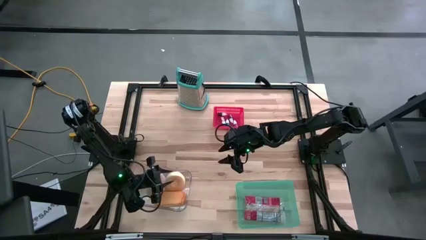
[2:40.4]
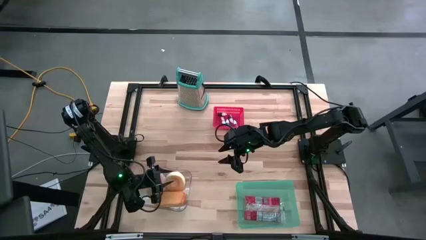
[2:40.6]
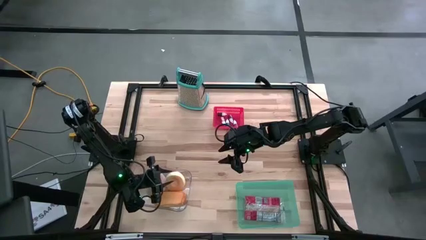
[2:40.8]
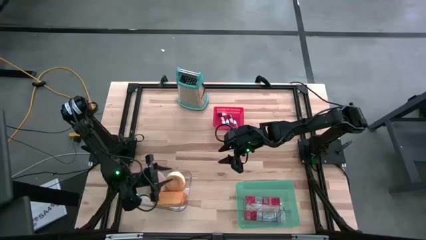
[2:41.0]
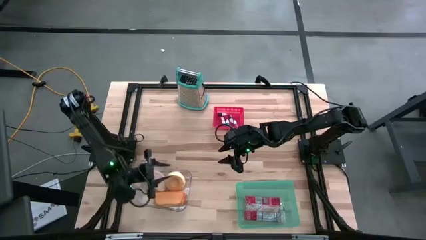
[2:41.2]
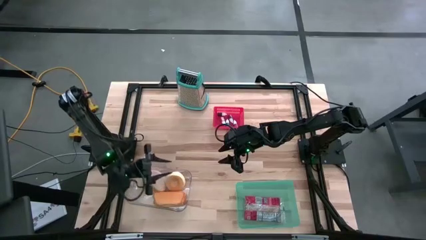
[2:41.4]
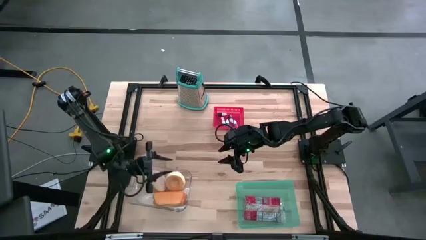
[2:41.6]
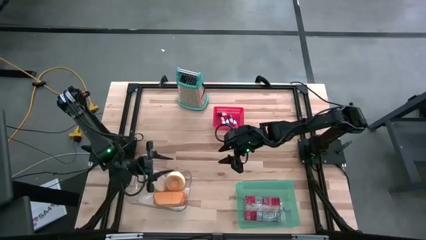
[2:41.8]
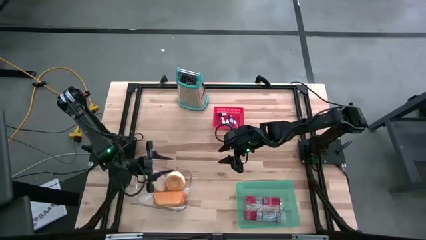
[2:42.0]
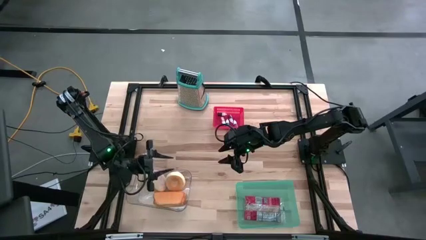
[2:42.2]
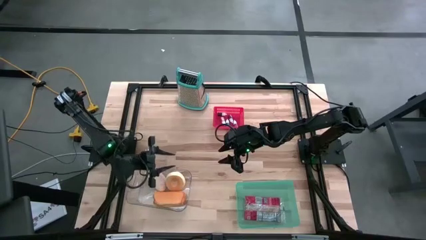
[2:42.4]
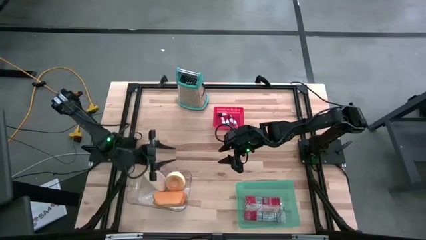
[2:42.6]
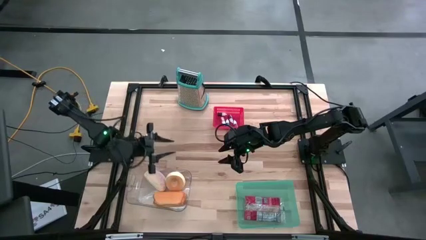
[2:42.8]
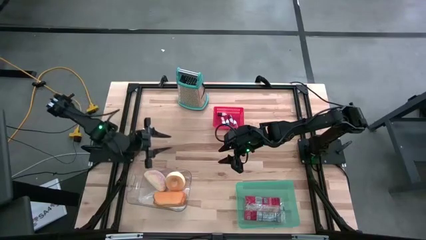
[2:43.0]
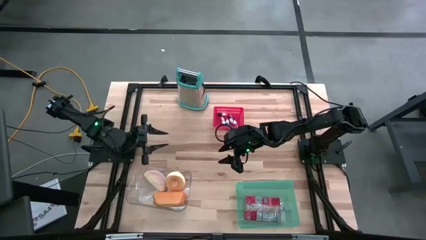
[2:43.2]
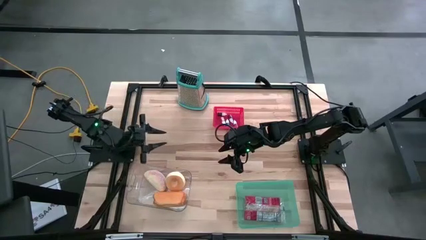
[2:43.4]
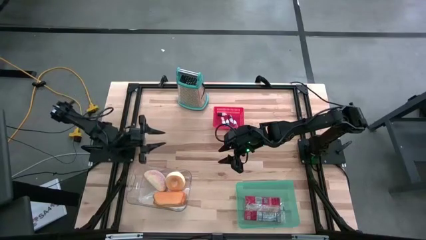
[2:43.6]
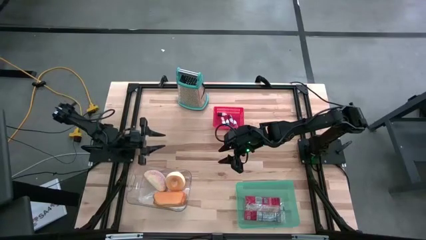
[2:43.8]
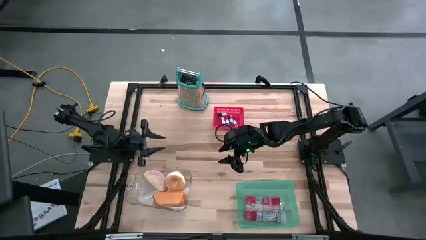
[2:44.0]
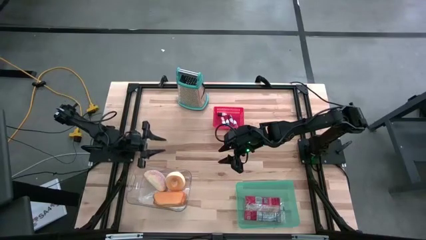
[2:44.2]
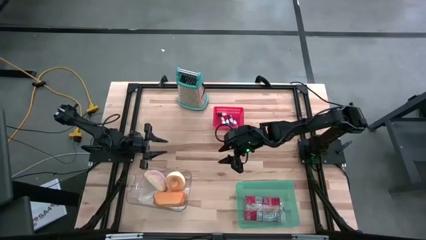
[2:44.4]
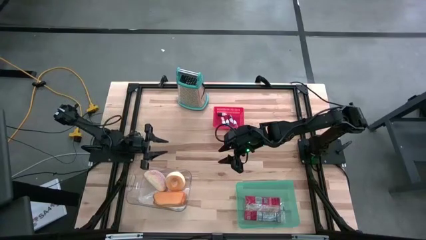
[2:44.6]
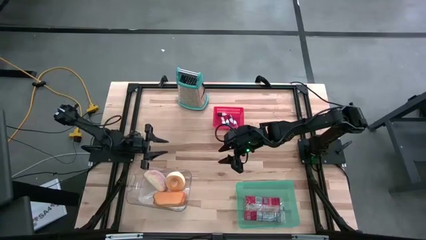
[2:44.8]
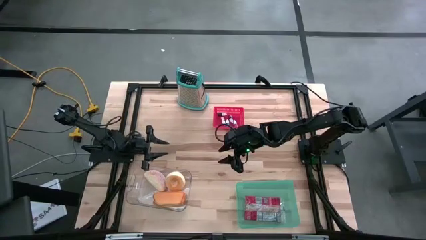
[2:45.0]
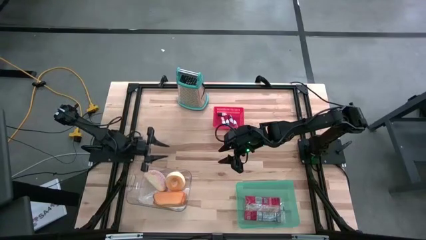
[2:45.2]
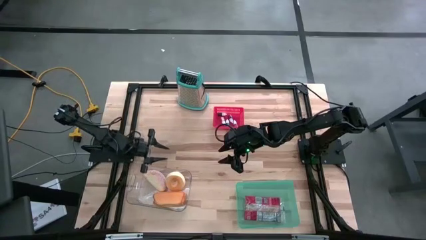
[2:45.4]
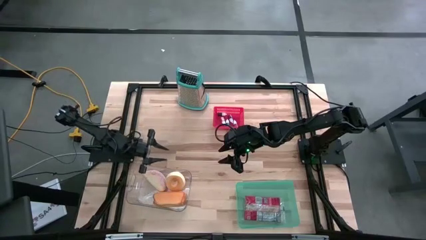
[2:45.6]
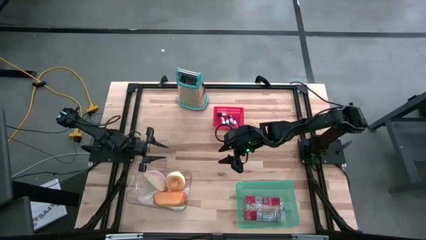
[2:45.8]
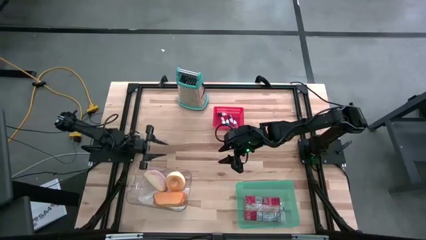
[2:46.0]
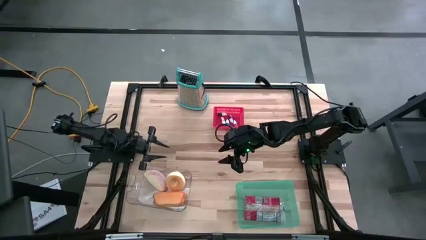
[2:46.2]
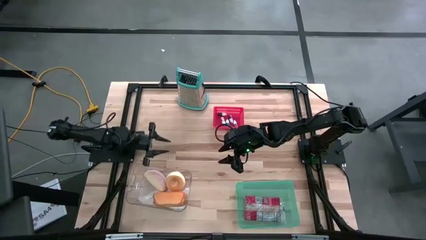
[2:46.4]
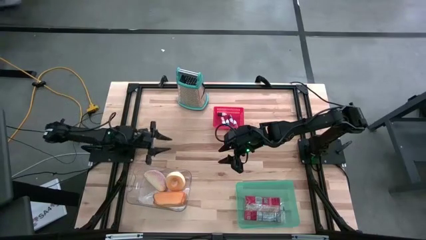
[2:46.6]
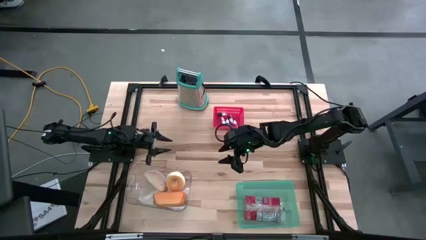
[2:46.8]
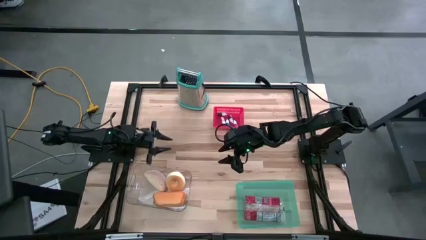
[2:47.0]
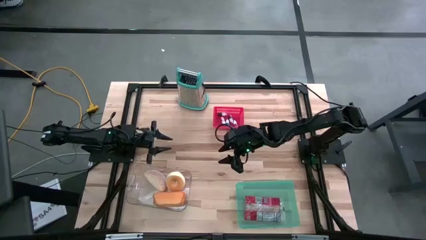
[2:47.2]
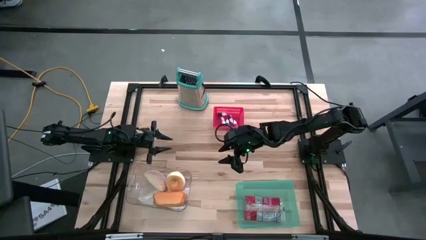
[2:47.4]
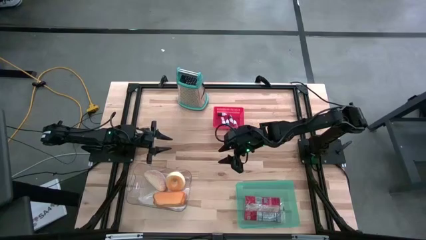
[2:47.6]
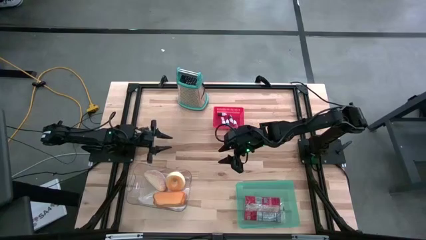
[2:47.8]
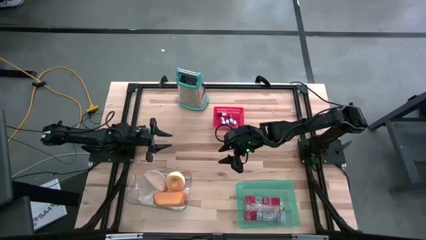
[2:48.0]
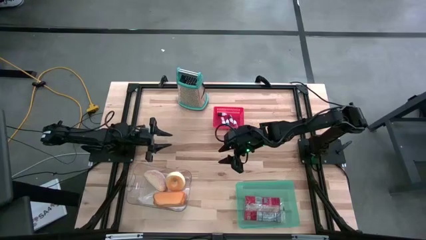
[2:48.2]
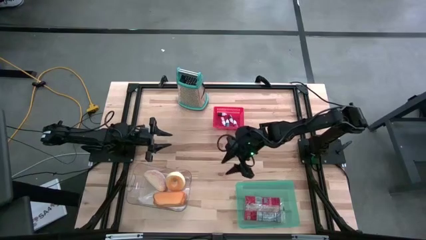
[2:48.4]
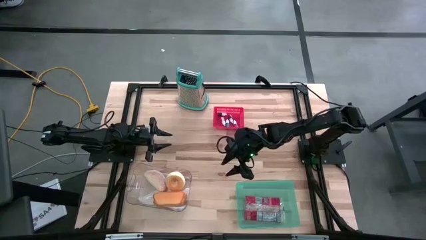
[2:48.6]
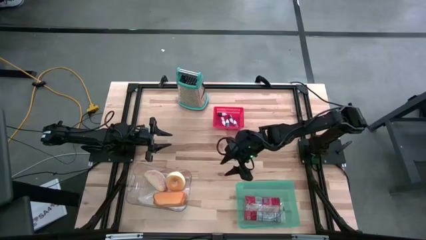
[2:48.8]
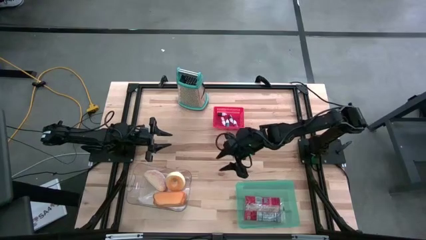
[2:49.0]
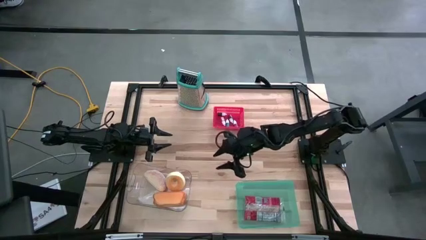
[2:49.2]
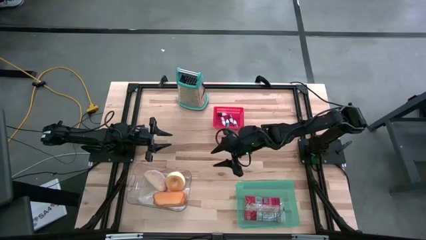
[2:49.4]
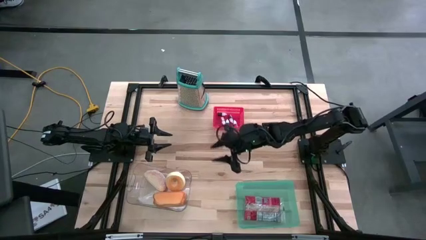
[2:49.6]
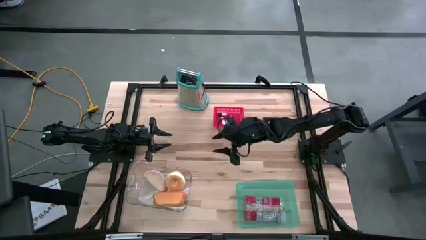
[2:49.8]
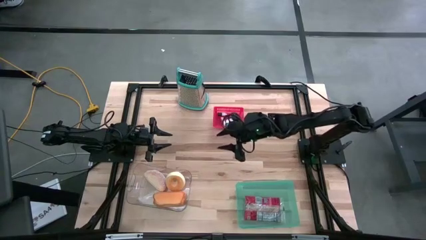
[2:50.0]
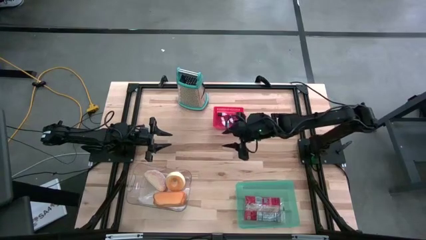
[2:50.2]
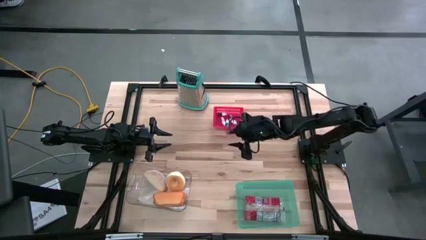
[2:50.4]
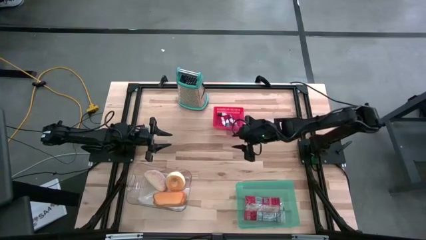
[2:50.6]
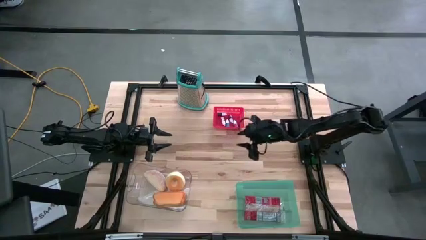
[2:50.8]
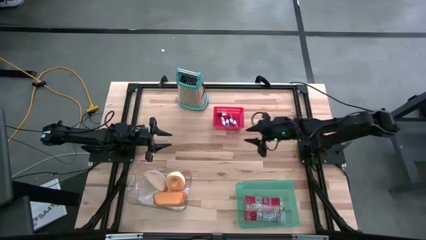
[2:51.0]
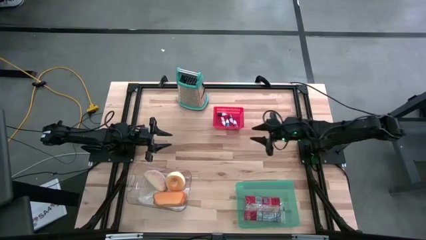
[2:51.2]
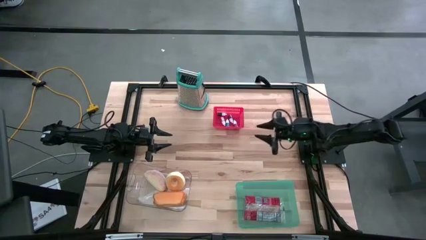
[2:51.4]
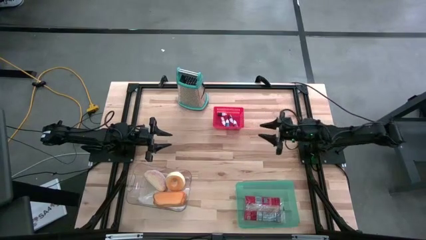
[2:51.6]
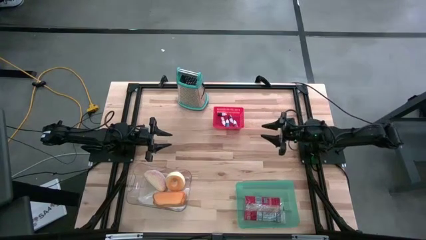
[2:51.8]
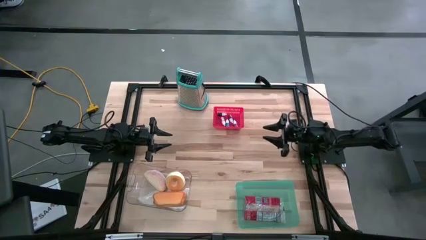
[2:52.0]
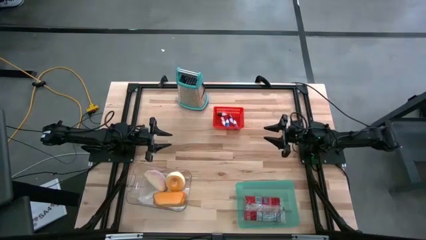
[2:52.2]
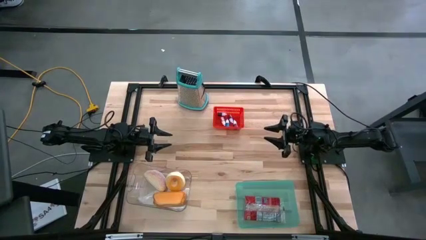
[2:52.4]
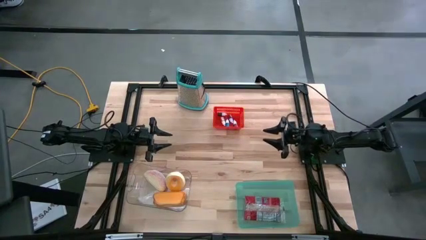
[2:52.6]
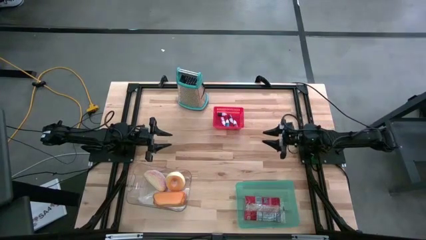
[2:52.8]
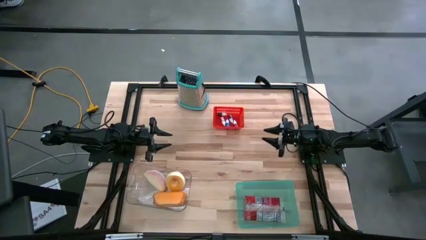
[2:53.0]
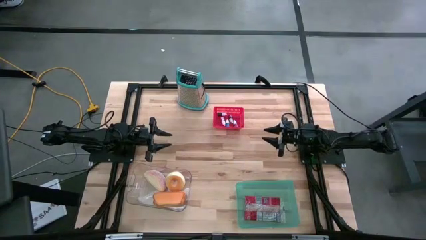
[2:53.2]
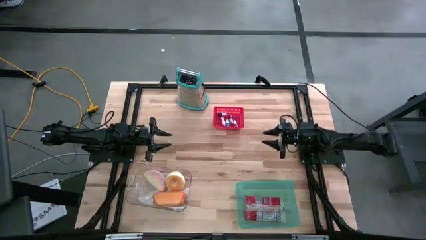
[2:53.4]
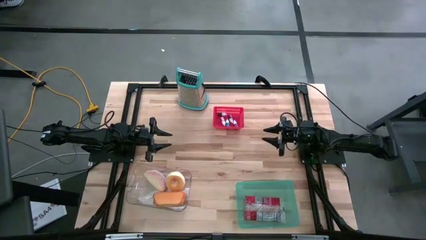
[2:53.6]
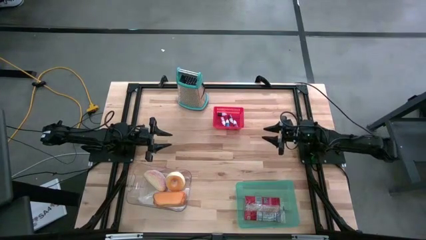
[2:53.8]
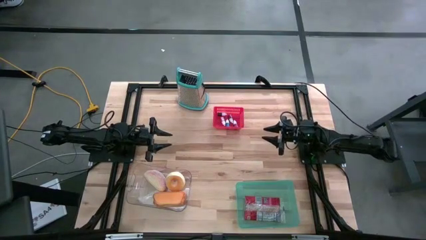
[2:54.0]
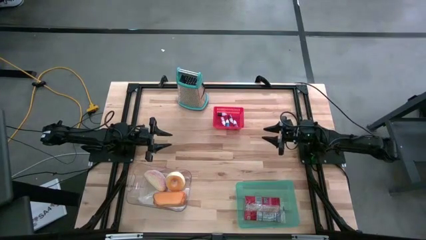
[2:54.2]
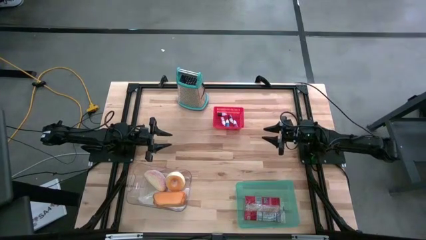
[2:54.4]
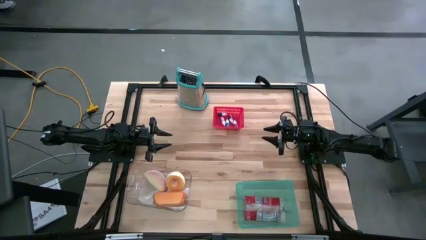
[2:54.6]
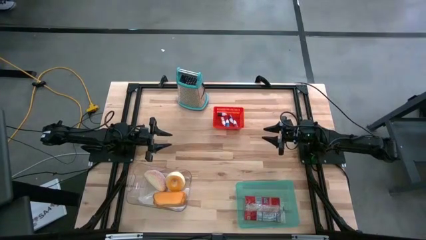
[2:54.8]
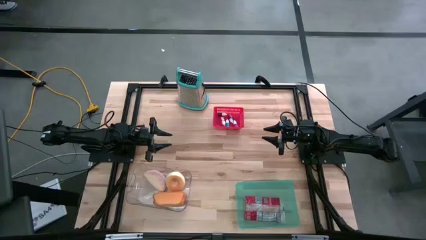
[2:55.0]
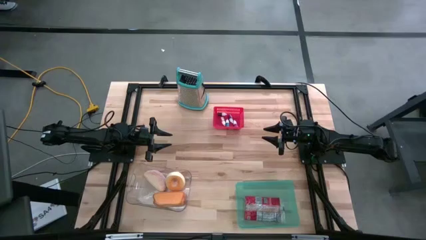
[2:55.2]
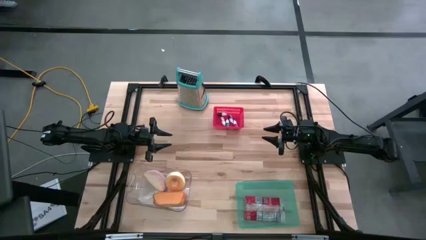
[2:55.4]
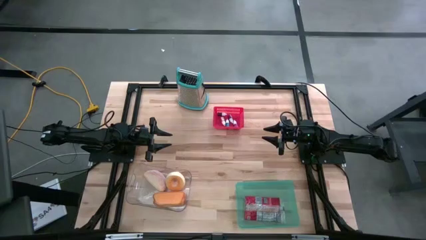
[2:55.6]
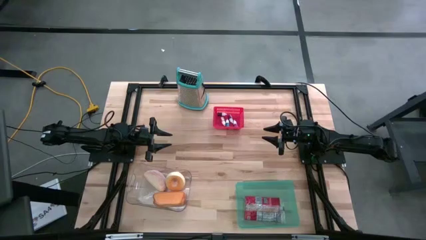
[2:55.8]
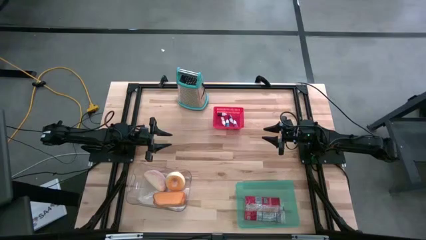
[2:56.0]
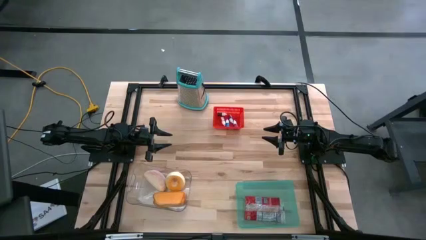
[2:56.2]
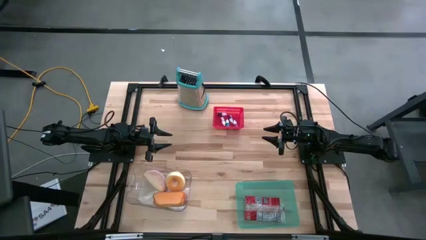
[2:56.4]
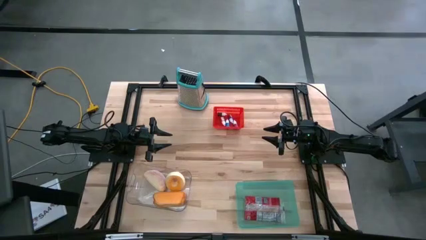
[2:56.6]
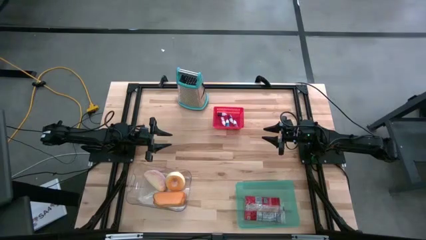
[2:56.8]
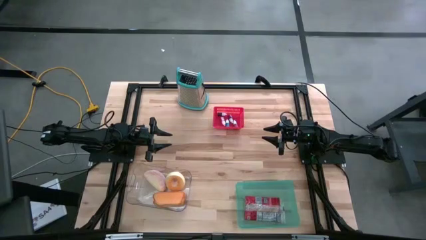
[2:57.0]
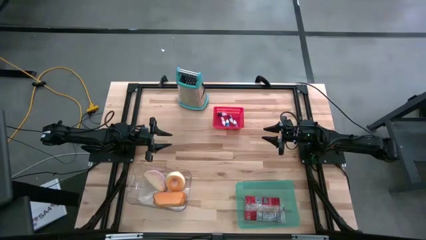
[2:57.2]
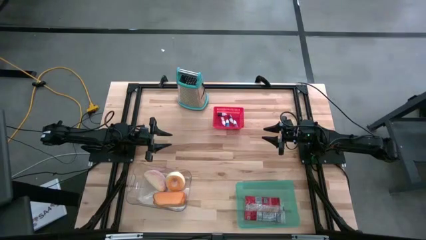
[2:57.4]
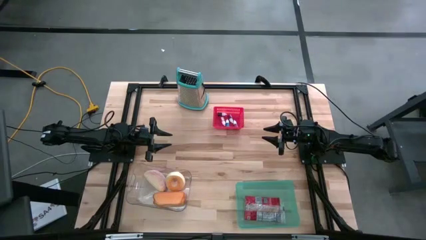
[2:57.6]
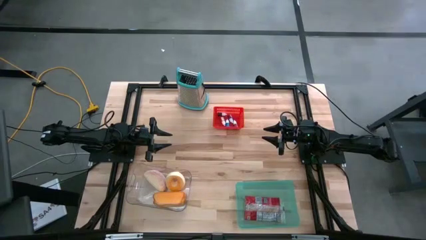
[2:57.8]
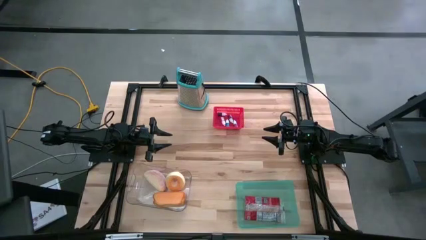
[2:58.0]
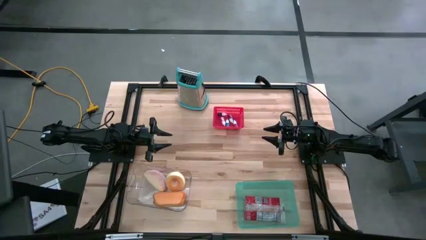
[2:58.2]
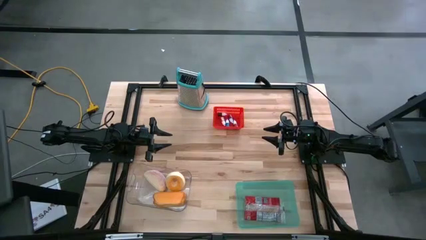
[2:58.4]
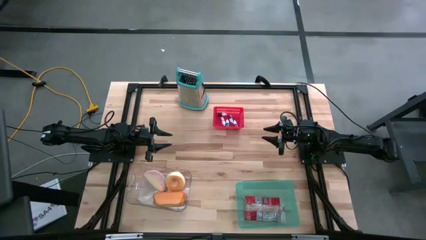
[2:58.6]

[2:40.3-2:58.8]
Return to Home Position
